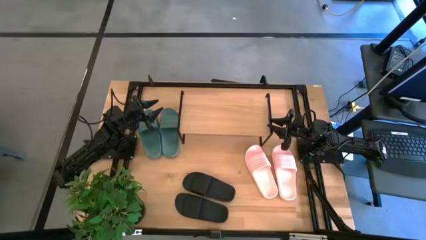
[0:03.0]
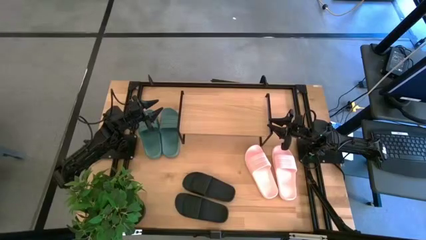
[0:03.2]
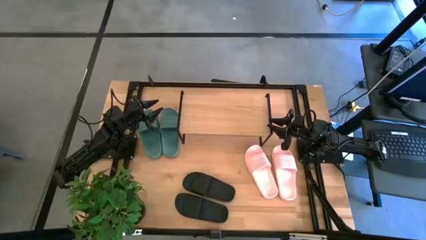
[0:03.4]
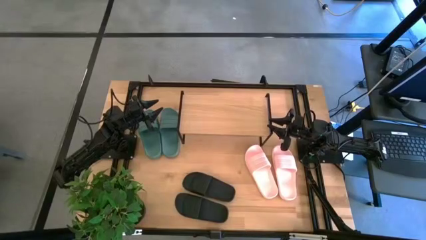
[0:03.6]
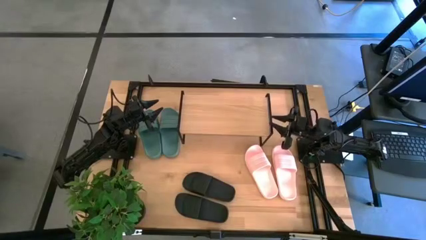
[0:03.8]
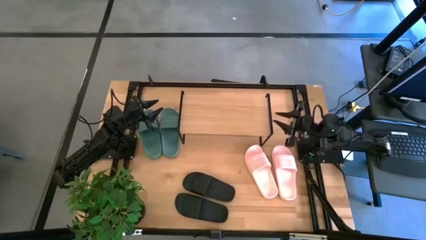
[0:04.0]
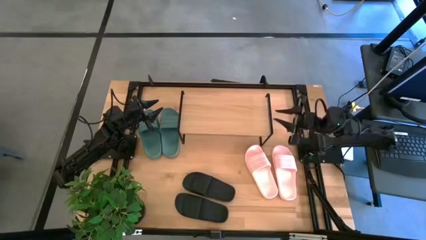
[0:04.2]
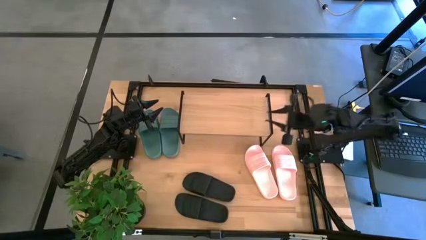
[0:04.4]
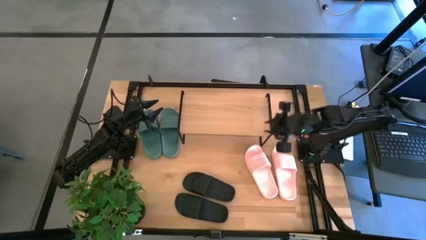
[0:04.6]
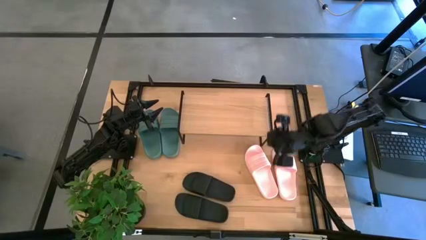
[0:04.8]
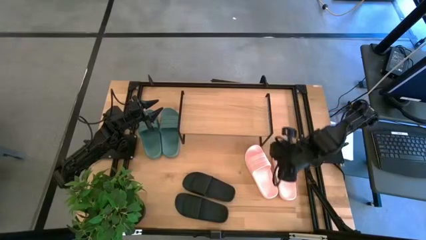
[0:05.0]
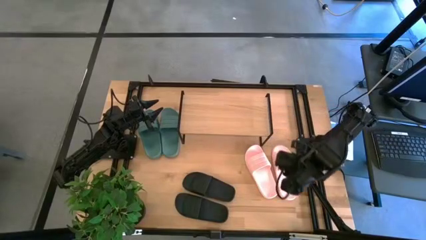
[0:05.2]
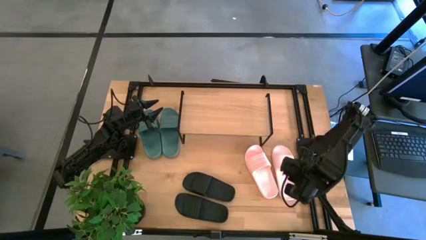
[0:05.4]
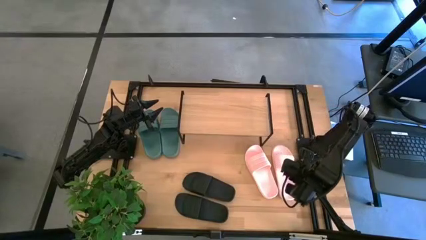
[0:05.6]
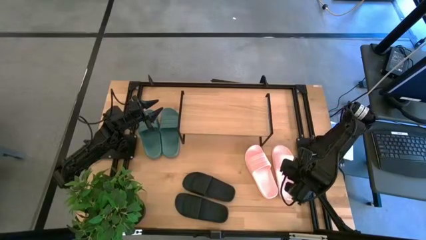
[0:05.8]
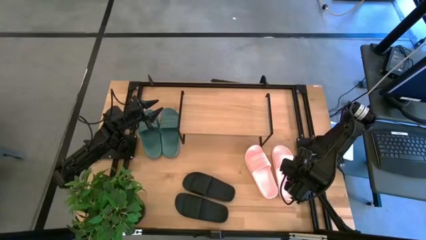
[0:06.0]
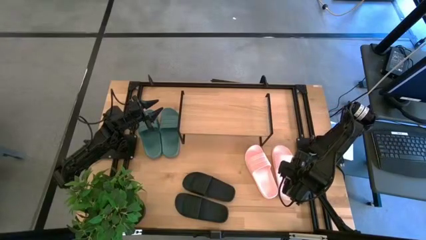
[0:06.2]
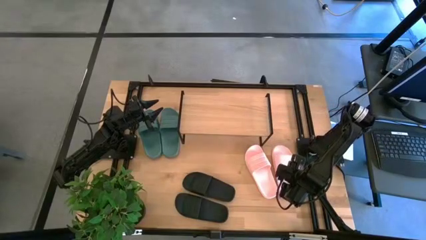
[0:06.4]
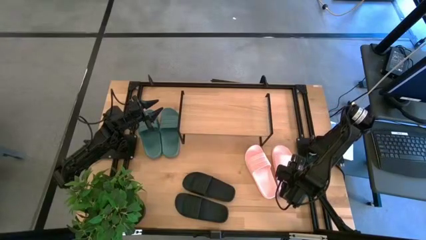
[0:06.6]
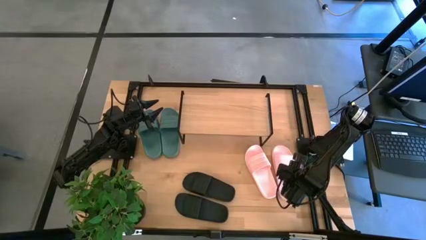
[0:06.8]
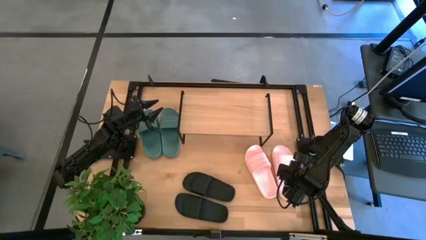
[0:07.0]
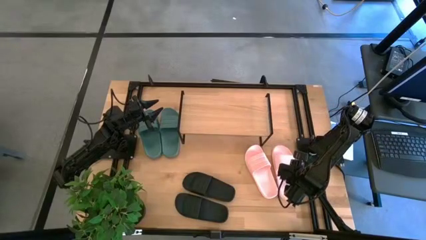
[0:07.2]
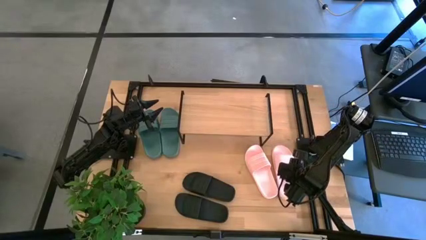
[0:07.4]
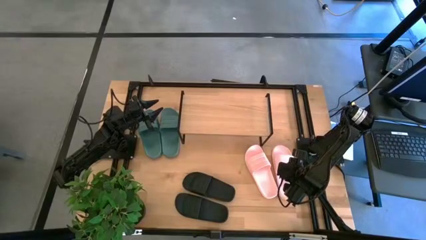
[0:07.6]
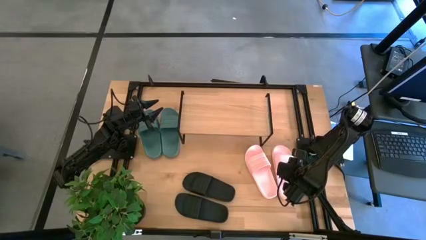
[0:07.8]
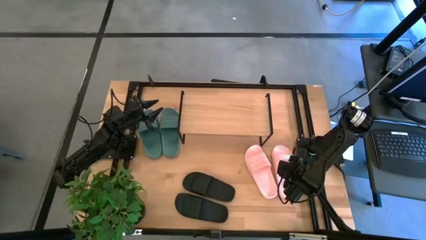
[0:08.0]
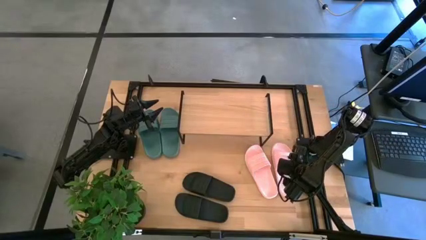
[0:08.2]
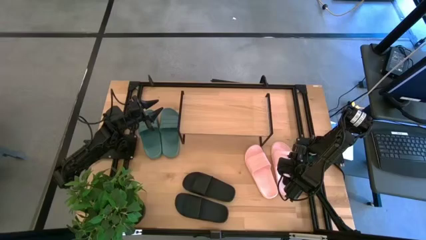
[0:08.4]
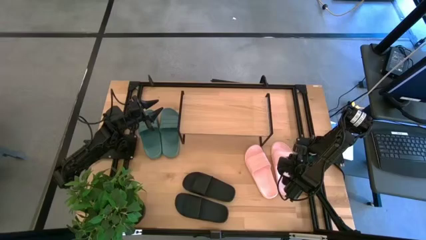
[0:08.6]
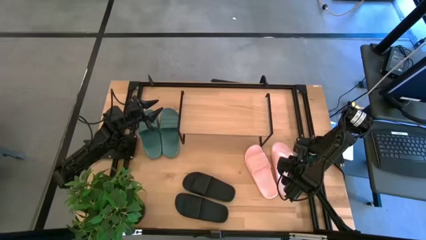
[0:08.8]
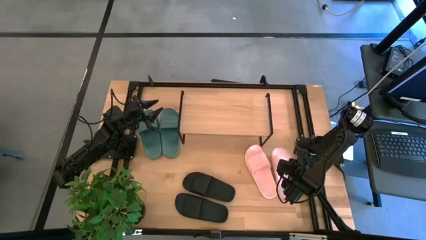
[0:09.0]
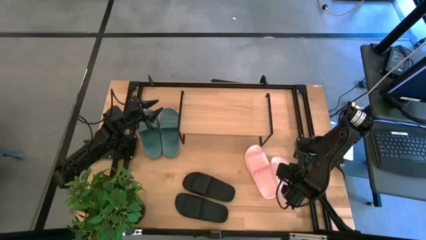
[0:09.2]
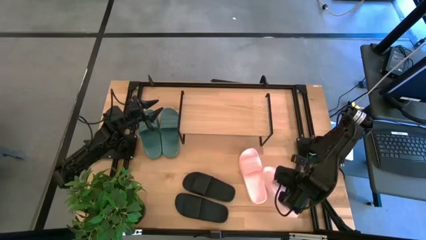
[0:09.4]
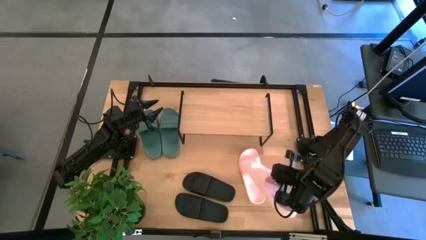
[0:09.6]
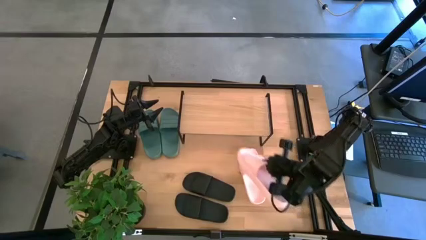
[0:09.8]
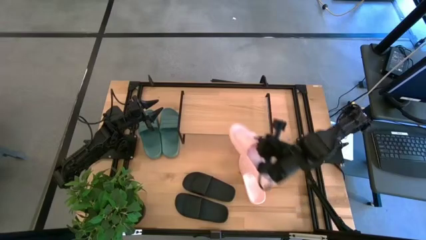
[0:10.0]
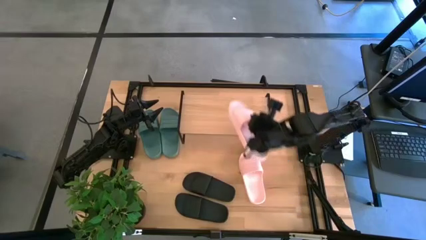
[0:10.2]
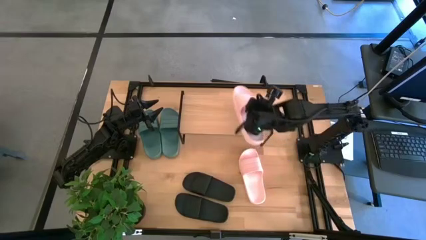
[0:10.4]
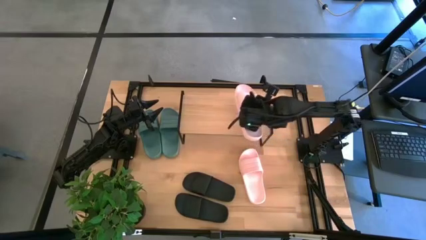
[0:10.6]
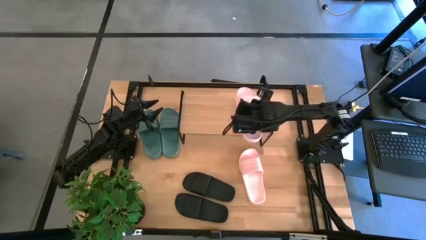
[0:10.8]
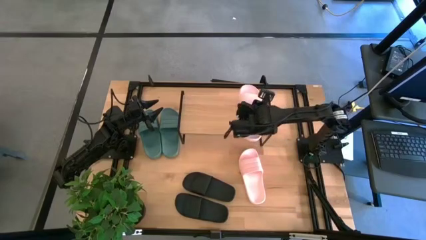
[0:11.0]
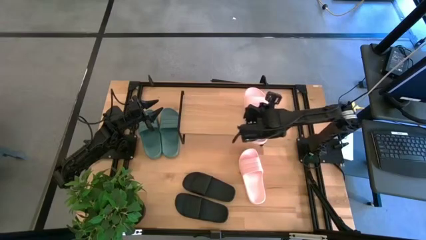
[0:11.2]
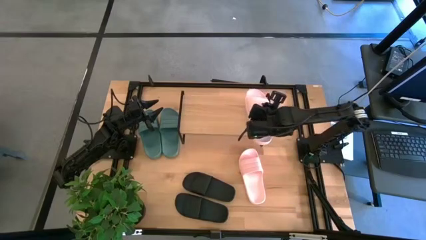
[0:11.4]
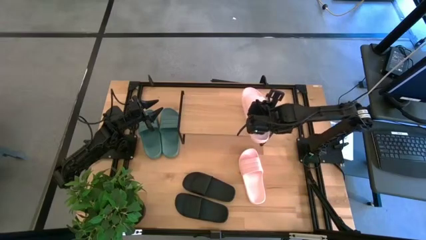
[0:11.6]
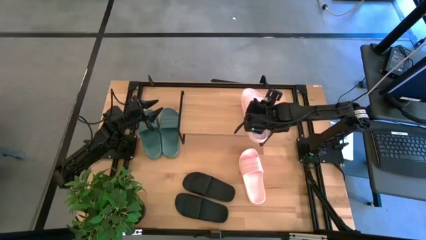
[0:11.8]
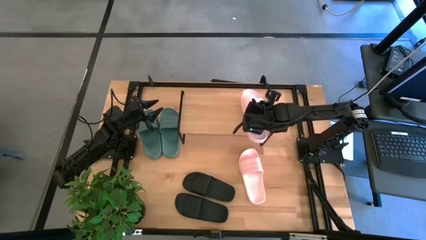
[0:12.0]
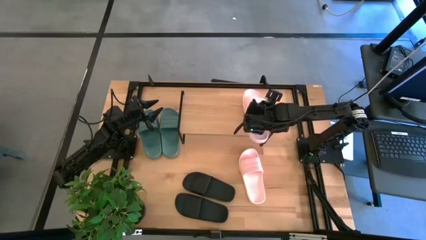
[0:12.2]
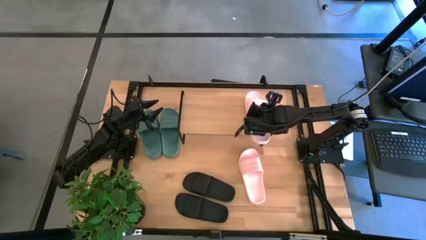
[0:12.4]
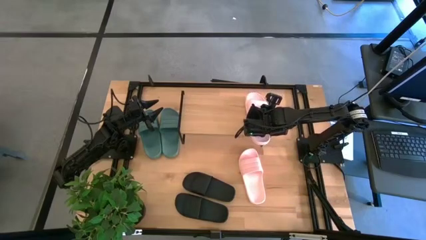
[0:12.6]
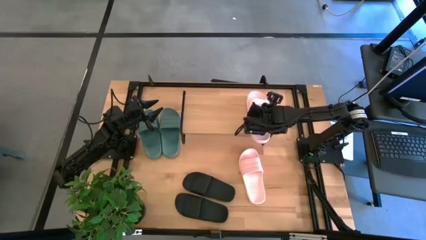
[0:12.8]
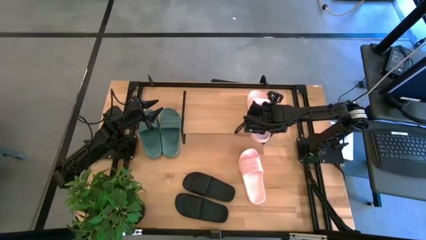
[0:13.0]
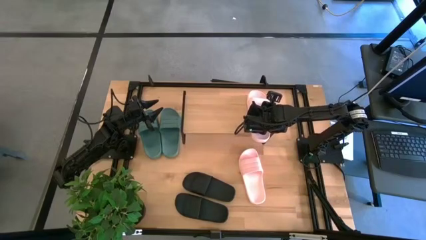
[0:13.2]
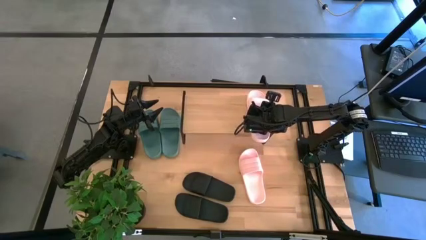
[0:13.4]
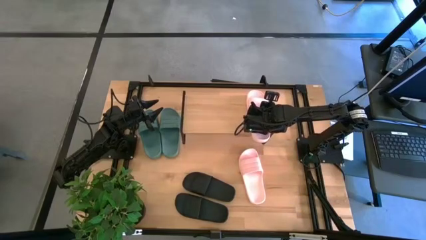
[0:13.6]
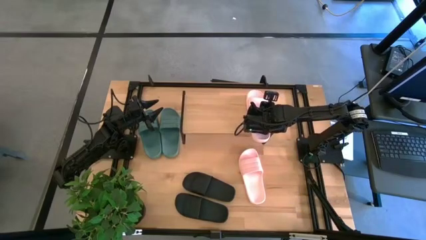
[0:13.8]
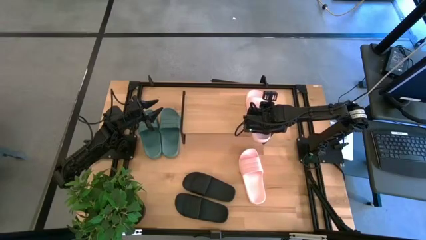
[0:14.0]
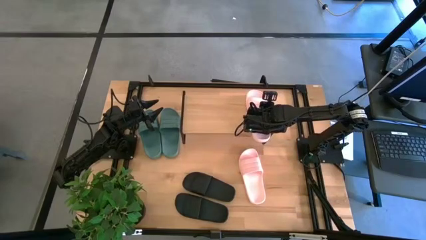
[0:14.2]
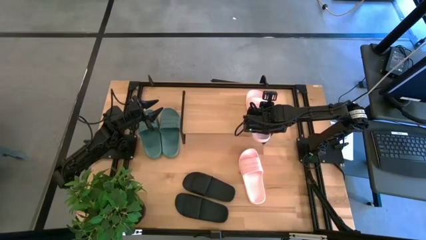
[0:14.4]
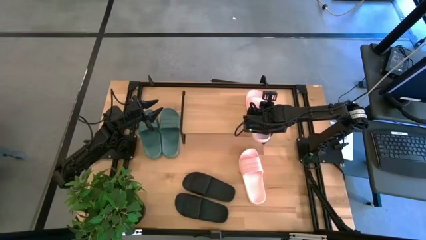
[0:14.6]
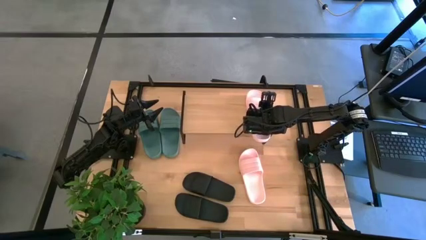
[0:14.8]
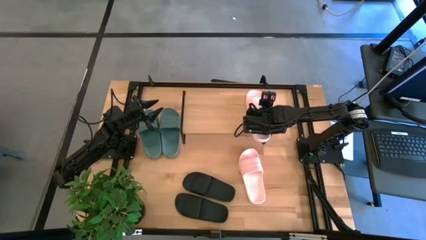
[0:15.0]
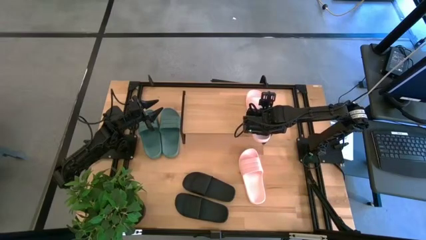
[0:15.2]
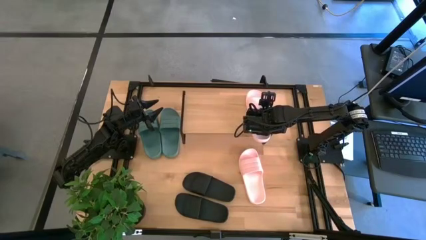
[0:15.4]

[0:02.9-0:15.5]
Task: Pick and place slides into the shelf
Put the right pink slide on the shelf
